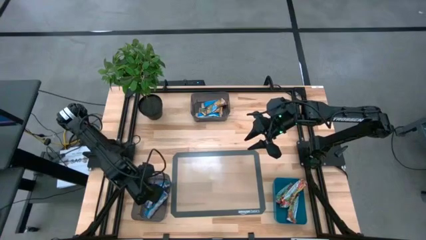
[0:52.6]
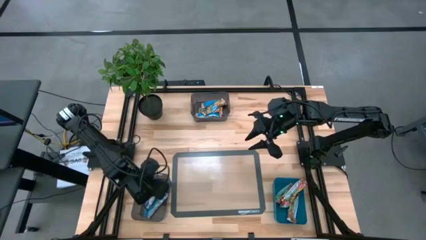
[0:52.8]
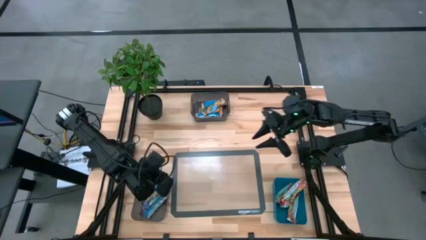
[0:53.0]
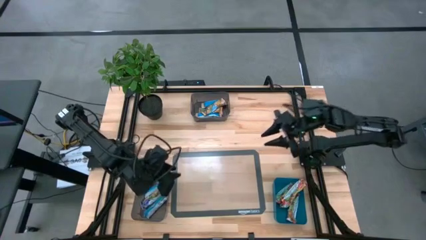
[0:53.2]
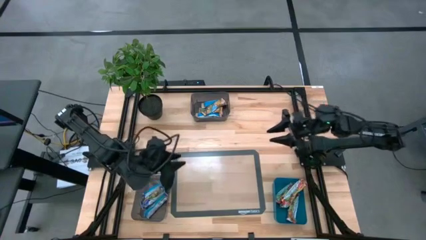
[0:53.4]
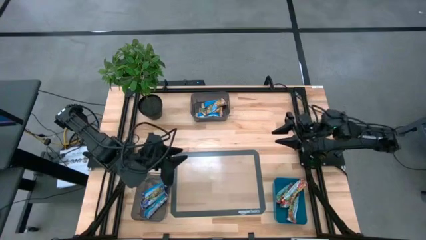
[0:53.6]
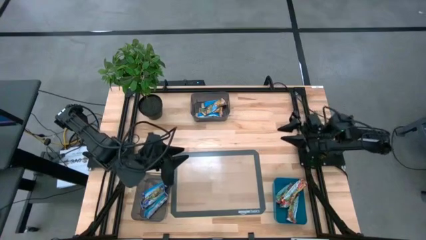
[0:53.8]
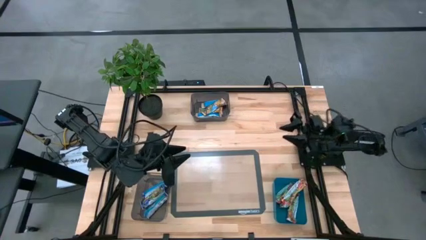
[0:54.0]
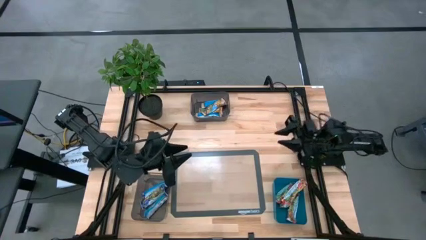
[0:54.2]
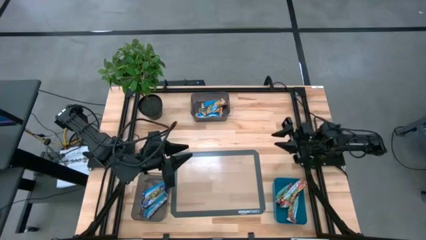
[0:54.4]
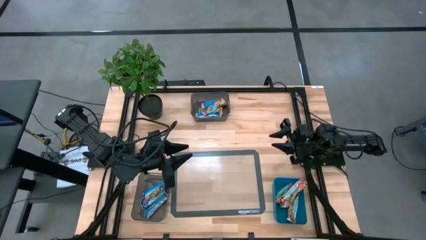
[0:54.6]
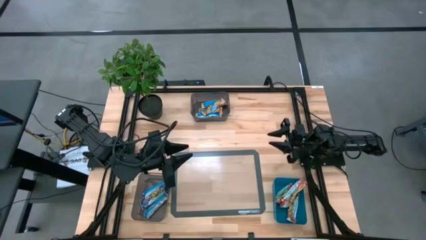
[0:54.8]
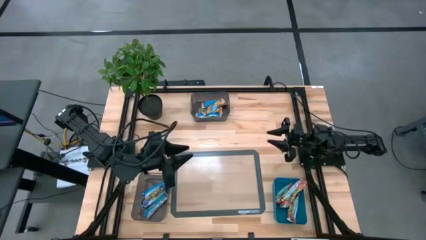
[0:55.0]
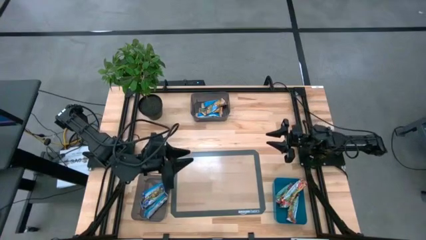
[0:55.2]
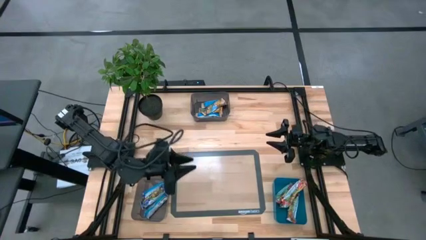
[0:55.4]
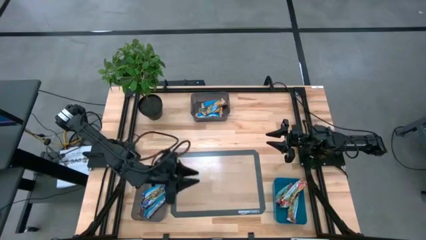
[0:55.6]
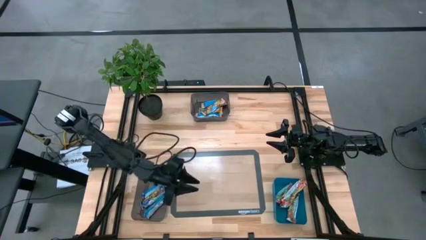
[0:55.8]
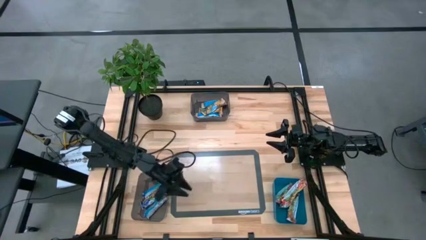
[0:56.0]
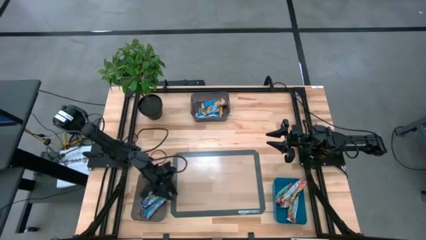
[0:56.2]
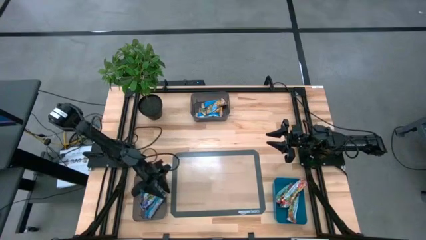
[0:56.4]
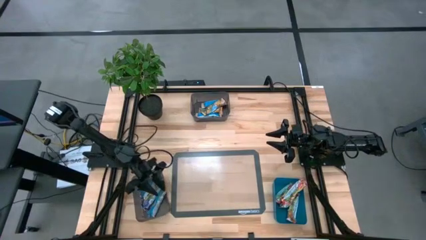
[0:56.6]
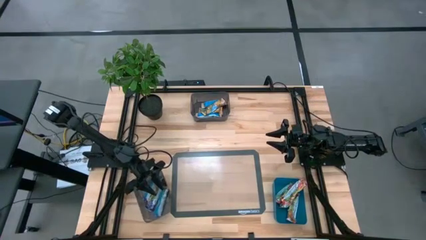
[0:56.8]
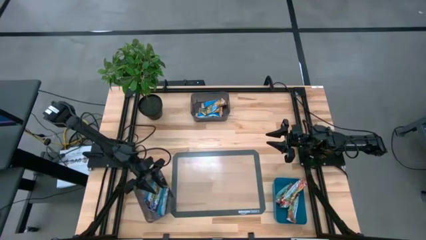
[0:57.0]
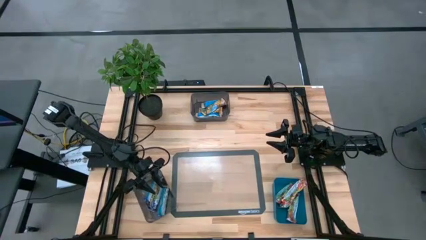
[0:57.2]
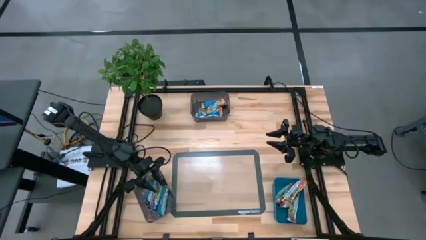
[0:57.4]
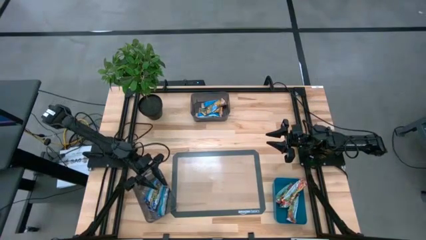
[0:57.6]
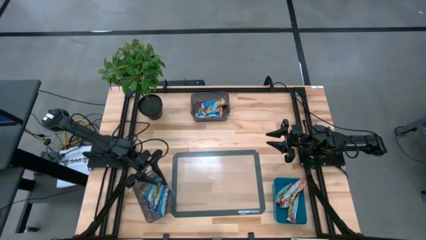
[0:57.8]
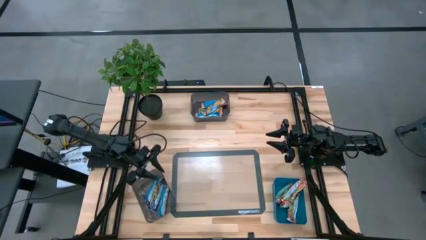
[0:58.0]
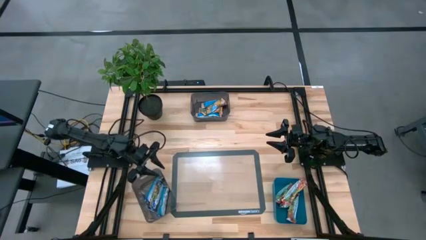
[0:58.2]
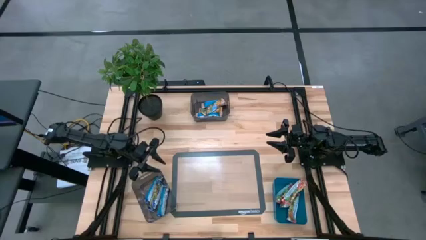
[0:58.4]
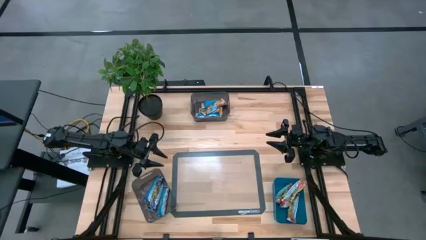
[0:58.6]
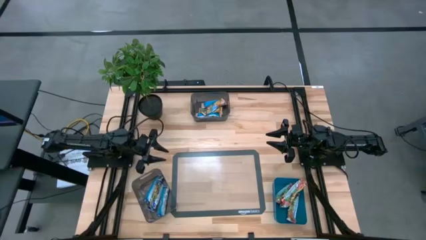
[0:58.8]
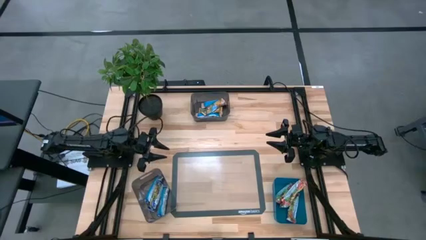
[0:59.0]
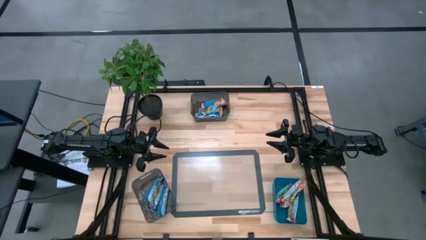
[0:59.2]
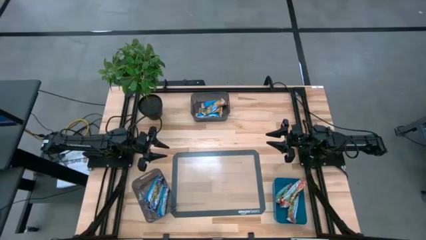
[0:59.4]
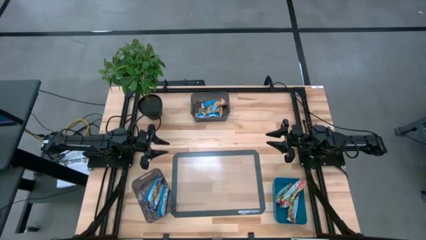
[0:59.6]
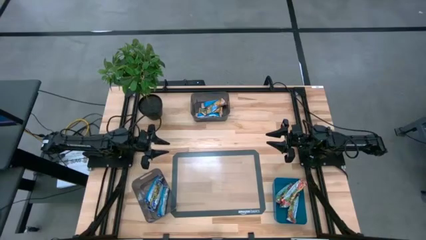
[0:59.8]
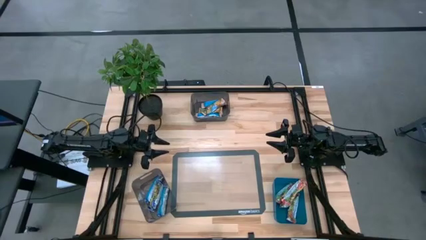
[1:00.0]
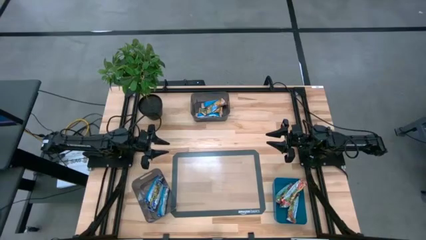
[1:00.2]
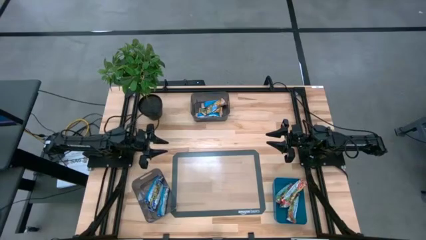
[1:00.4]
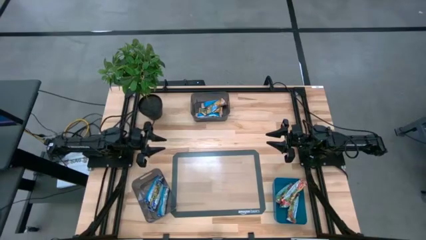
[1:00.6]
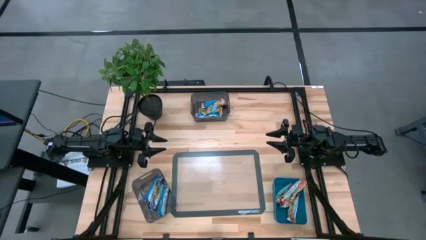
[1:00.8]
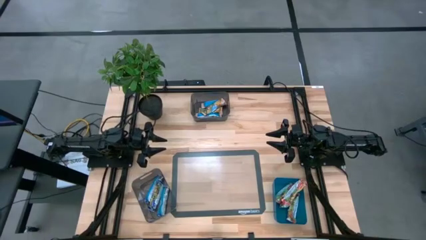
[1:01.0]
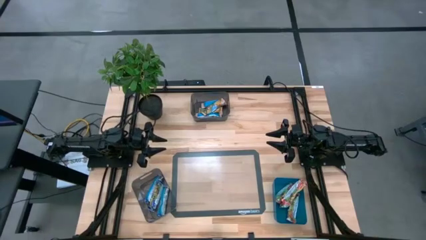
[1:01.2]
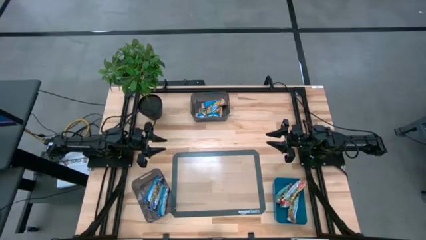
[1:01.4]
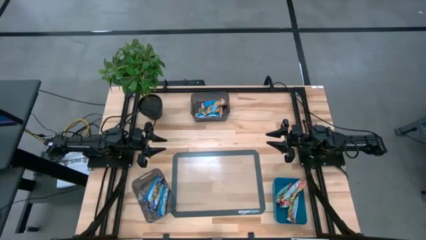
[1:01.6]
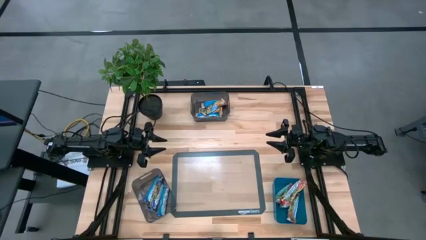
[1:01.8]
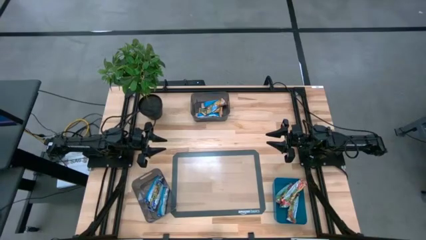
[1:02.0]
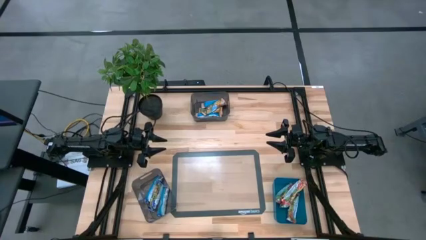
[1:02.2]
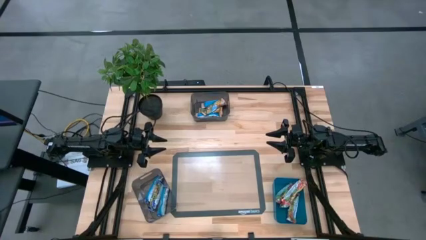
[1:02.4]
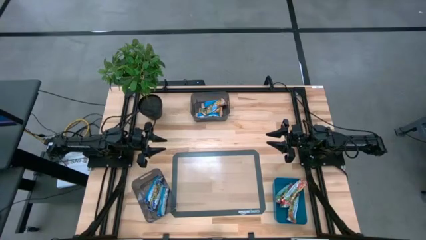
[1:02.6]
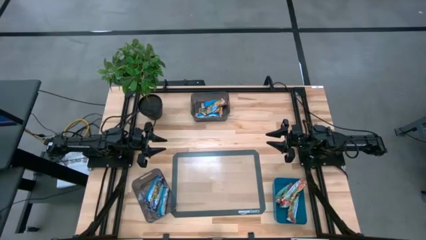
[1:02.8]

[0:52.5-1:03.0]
Task: Pick and place Granola Bars by type
Return To Home Position

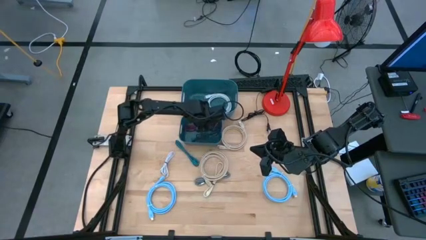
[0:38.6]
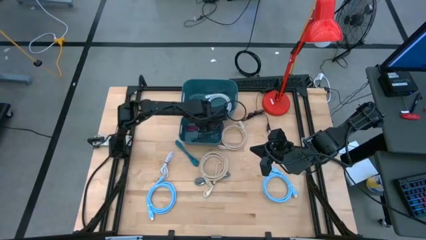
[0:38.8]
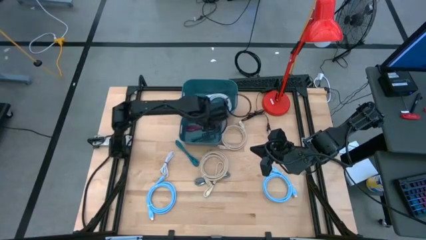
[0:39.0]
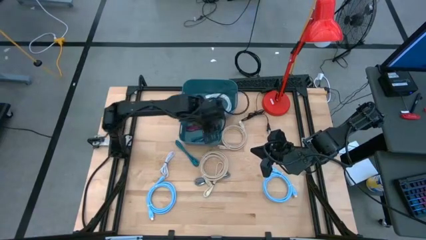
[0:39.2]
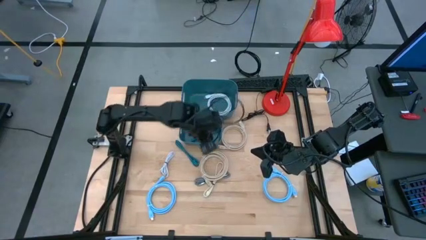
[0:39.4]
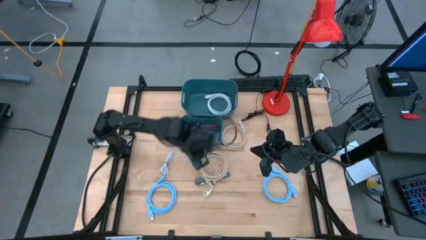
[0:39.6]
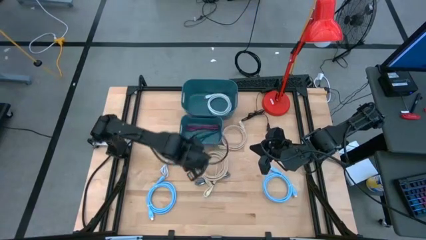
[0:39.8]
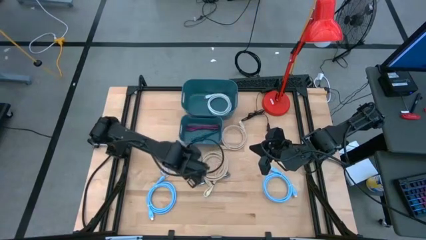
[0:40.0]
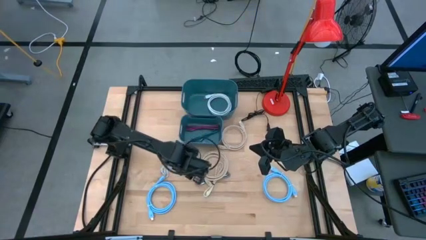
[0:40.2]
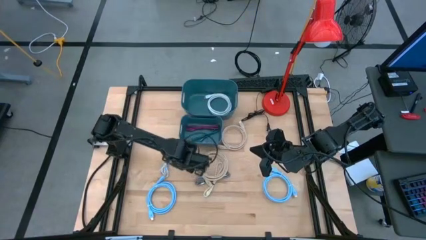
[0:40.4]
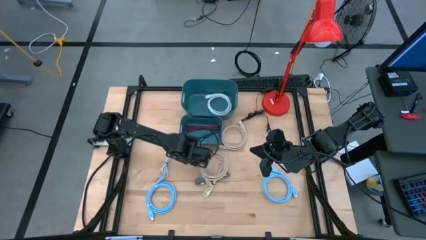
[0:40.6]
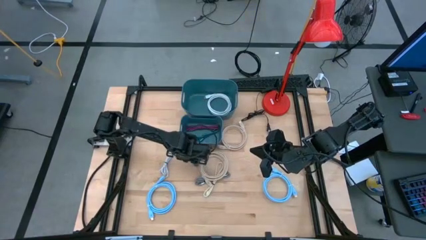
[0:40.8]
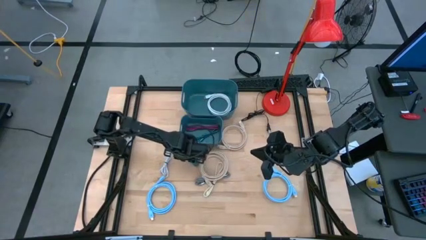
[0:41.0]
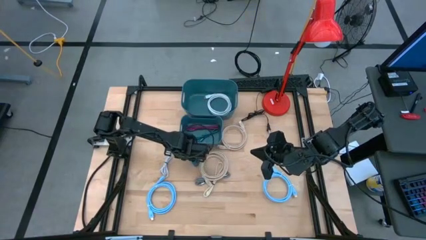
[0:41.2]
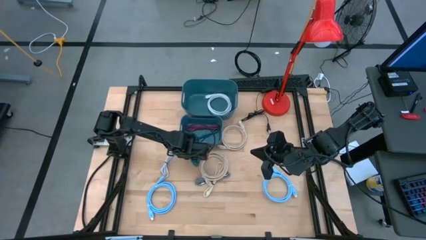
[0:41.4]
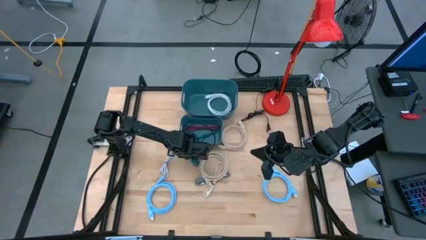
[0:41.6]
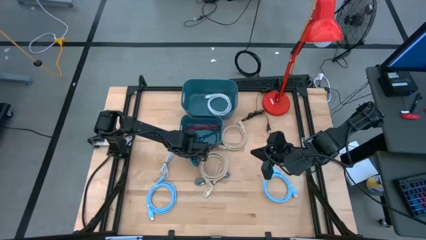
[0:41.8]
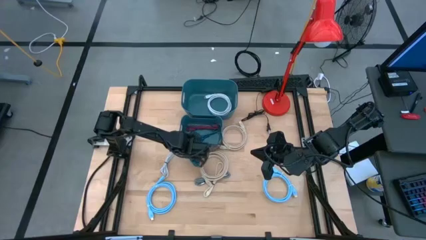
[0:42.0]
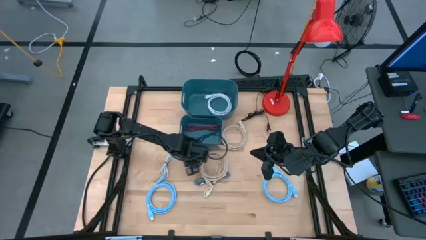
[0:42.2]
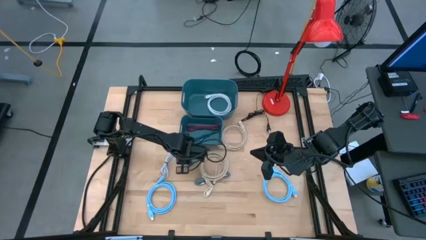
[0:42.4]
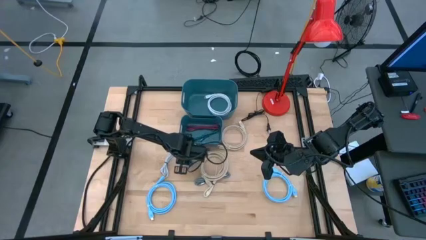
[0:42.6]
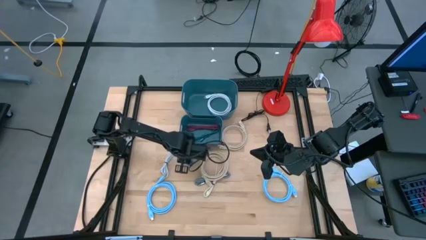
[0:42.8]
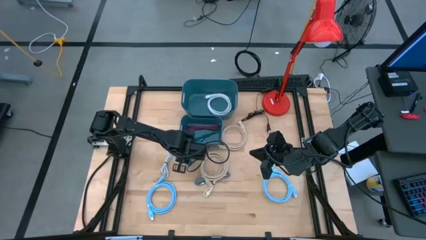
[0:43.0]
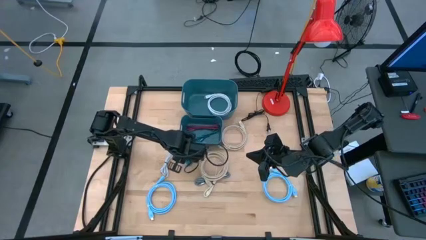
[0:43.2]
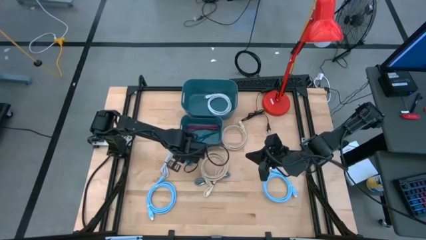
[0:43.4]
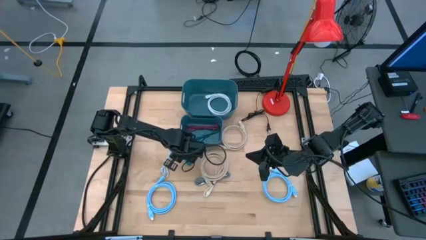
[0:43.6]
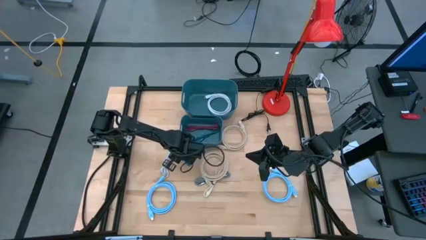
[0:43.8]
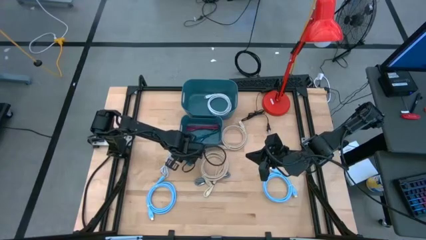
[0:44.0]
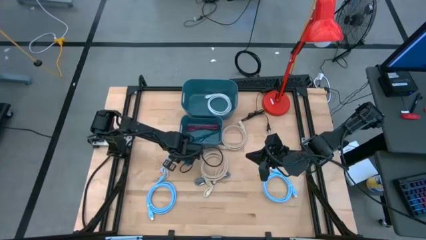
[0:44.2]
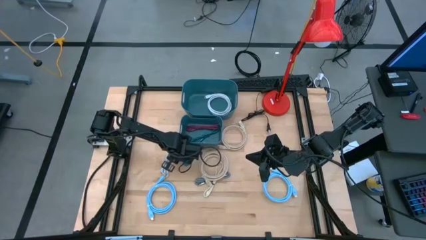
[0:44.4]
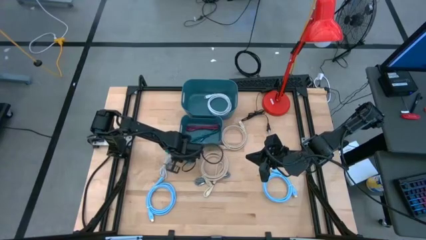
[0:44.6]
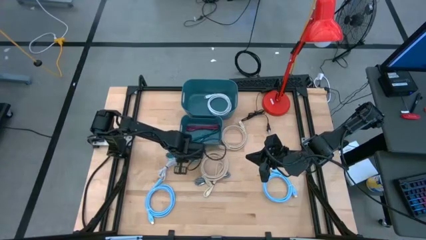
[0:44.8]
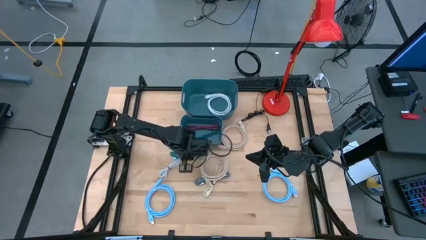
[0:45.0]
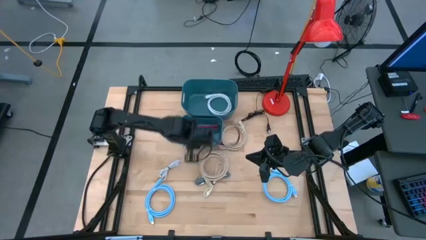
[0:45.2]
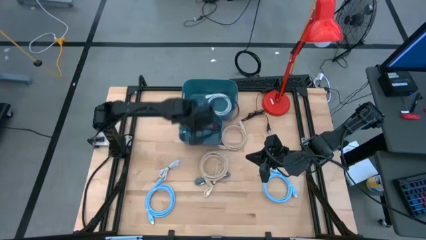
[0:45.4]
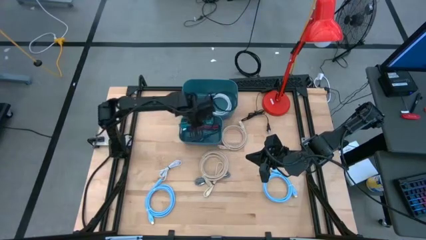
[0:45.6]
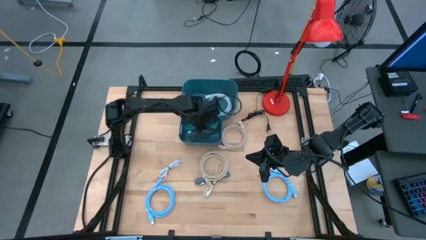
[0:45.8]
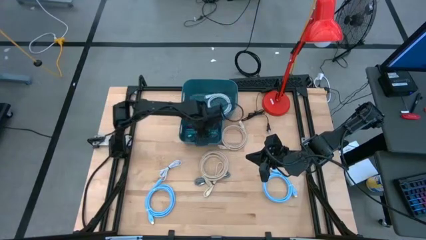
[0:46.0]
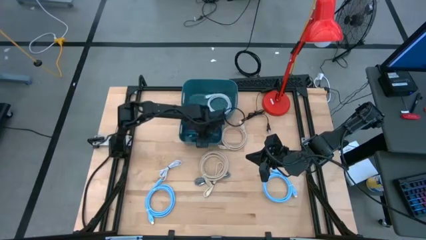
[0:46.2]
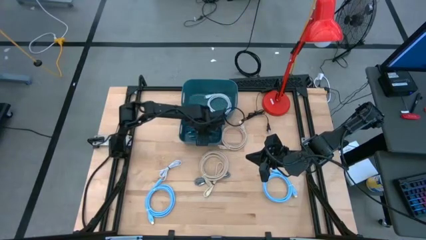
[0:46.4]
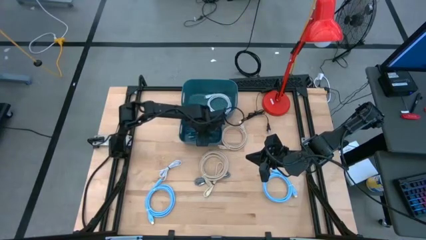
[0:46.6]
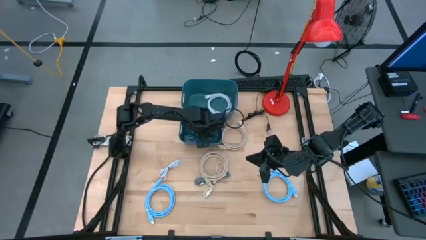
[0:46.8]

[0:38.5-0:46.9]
Task: Pick & Place USB Port
Put the blue charger cable into the bottom blue bin
